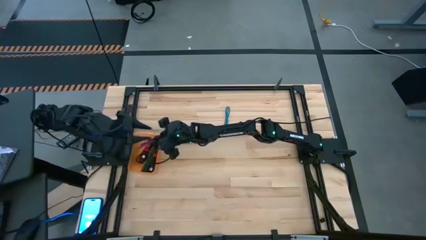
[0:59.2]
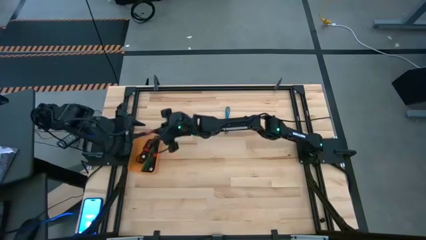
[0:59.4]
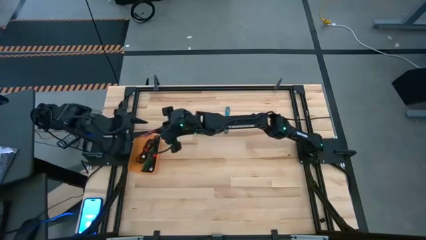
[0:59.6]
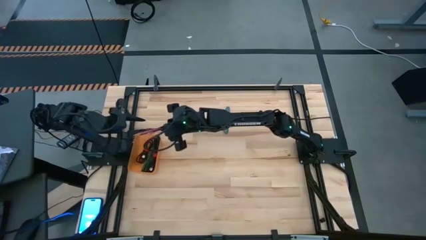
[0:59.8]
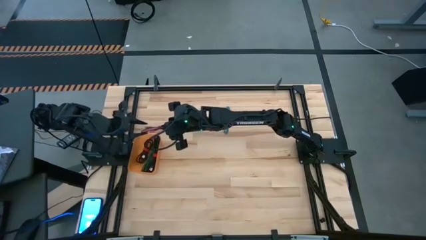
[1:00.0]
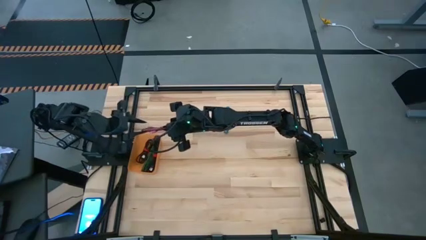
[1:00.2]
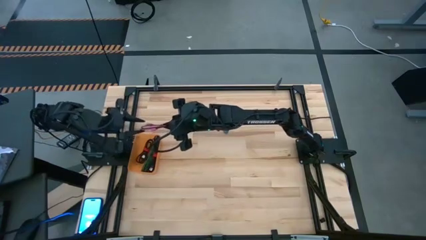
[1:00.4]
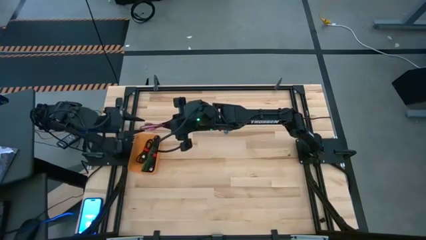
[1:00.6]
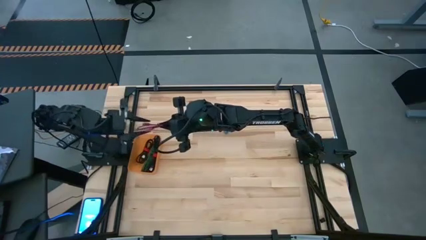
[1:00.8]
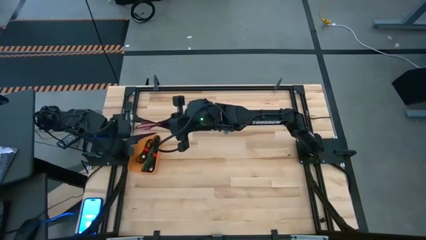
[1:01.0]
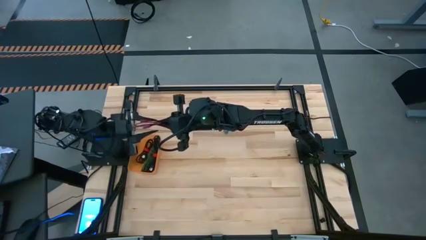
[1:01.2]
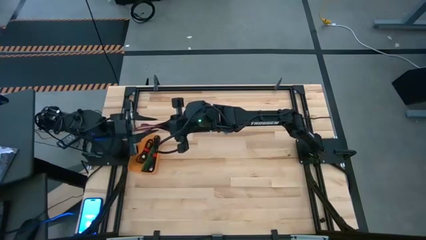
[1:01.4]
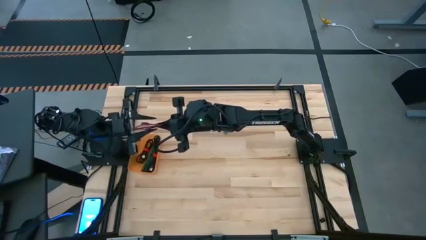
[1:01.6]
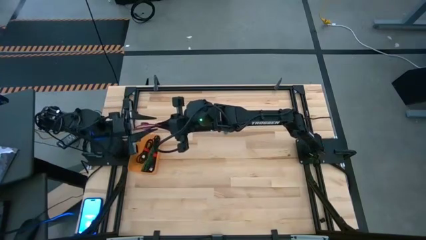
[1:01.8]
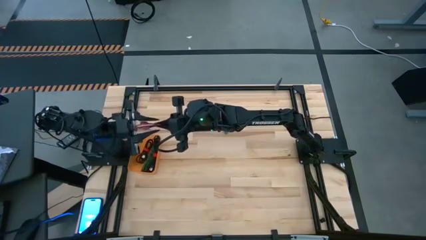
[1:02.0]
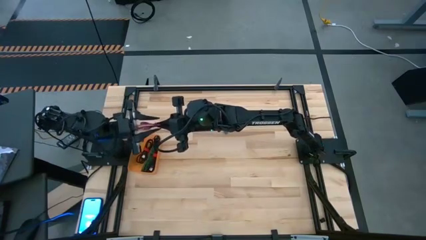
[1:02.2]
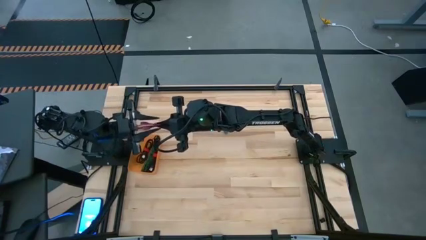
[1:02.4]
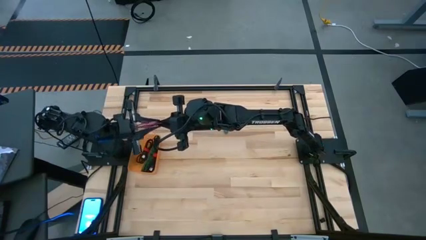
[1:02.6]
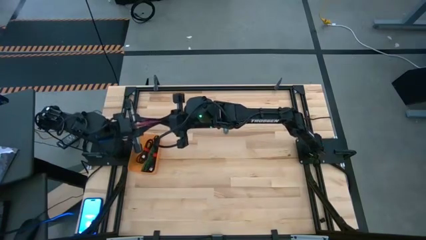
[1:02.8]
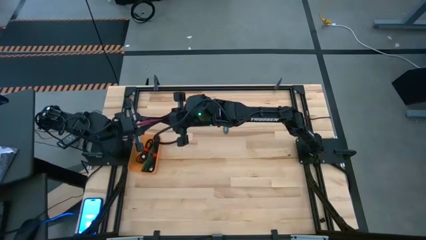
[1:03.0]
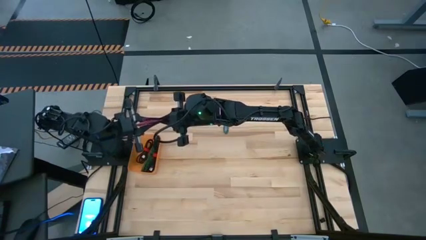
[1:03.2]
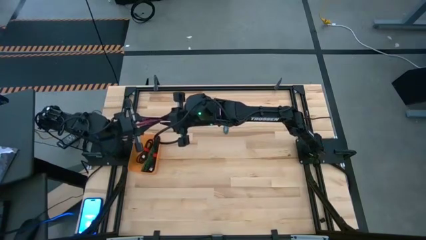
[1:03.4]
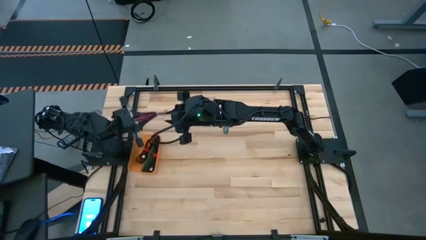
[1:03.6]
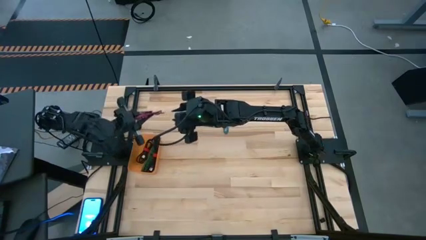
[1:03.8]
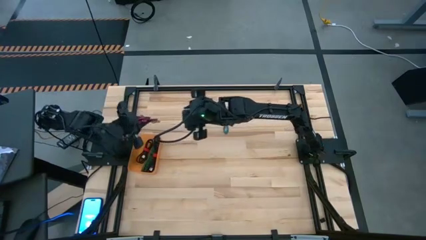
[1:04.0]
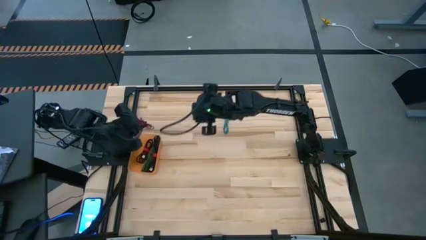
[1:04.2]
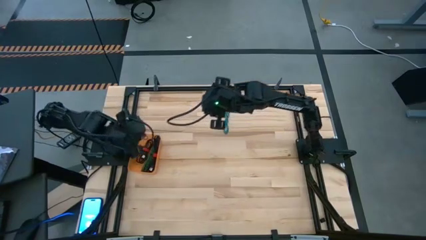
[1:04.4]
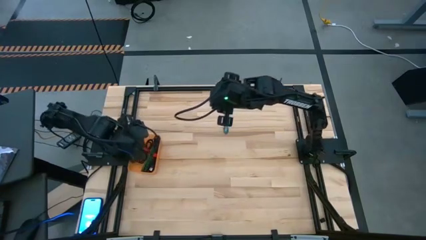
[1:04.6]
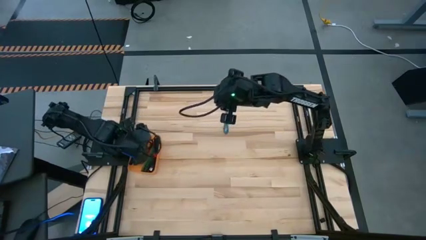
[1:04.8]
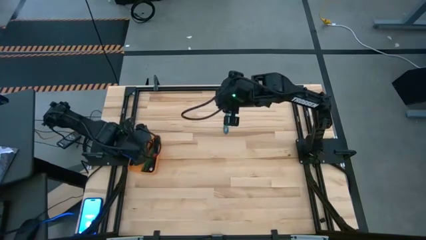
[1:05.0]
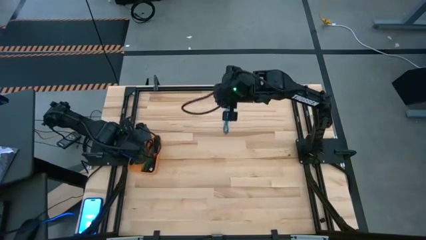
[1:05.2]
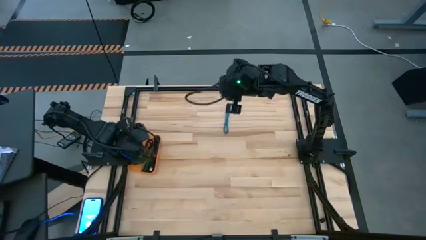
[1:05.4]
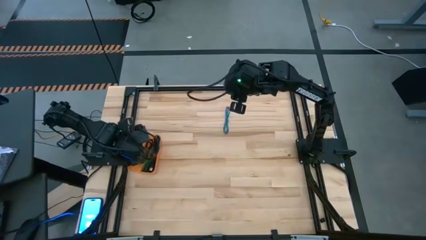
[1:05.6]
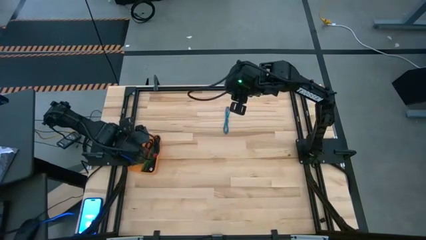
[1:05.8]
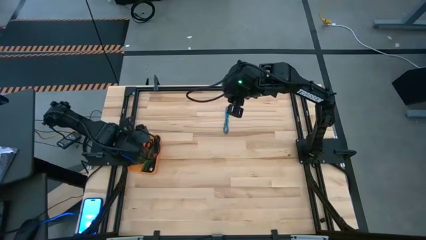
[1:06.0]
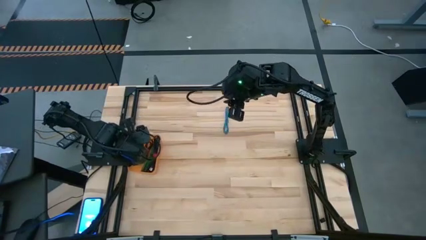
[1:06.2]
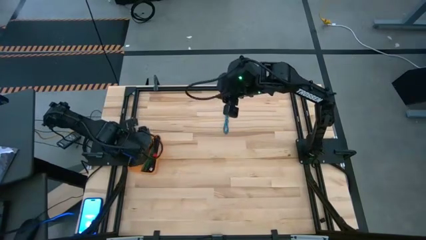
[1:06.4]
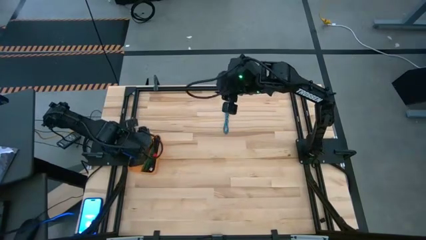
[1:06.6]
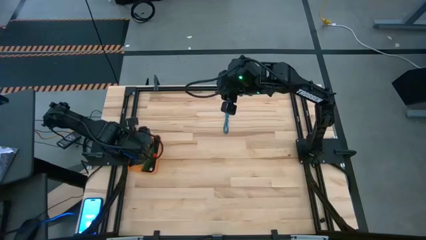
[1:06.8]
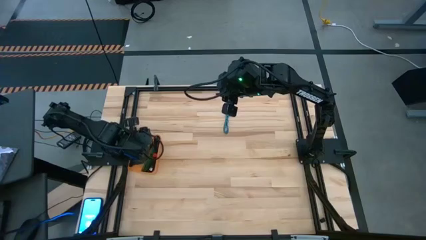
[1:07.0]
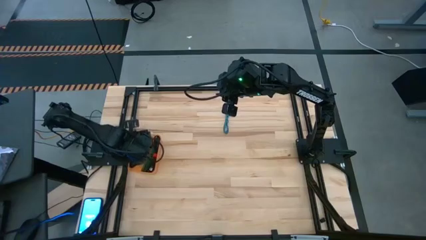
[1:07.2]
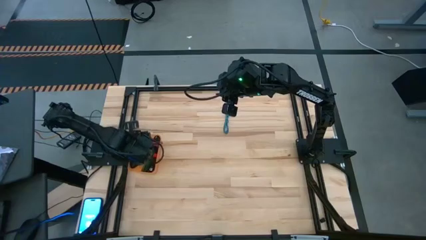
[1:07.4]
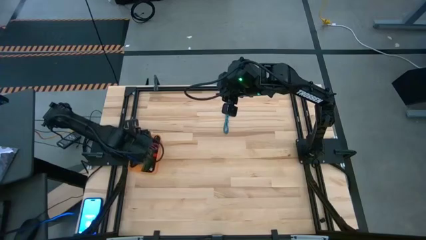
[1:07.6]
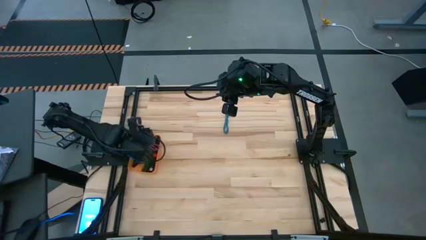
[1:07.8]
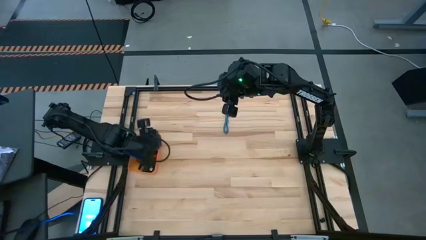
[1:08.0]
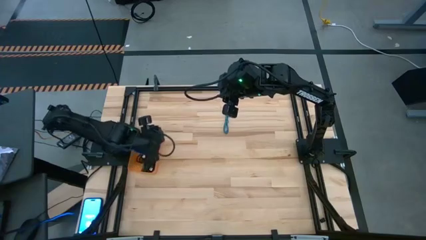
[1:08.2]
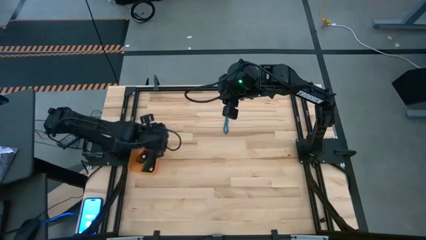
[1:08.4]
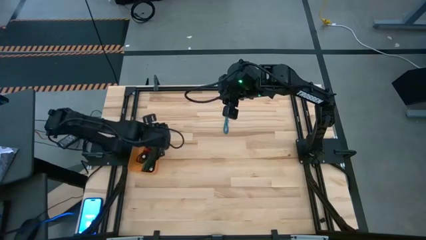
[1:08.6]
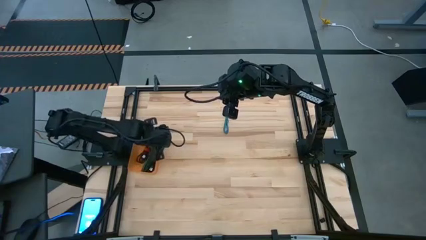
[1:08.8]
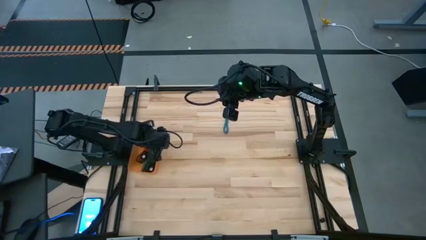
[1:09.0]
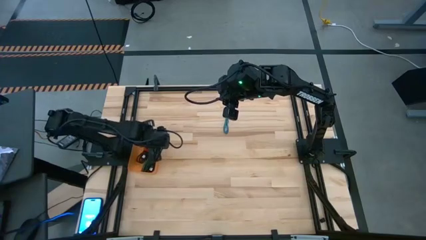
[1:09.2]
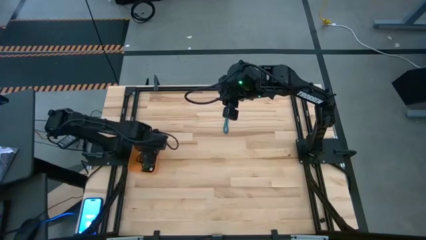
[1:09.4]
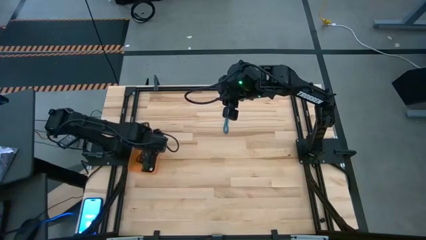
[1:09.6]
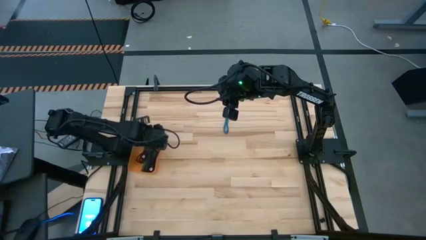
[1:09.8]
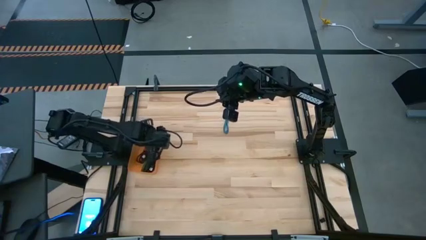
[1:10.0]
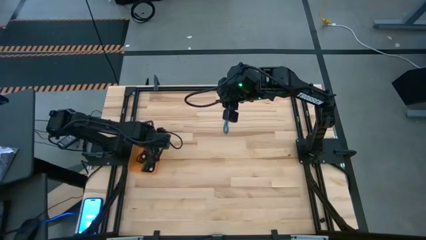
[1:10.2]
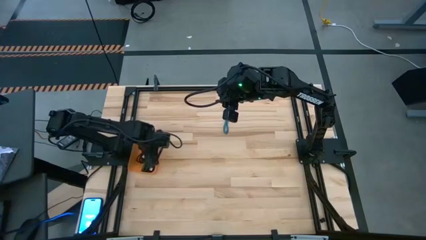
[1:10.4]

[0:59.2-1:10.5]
Task: Pick and place USB-C Cables
Put the pink USB cable into the orange bin

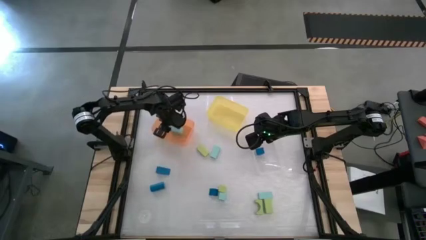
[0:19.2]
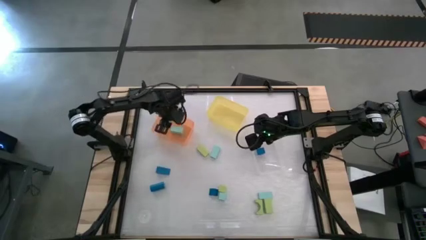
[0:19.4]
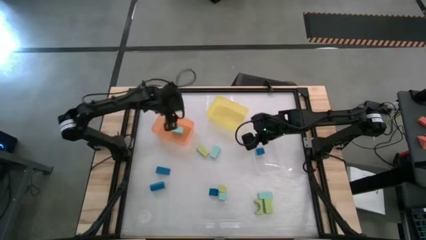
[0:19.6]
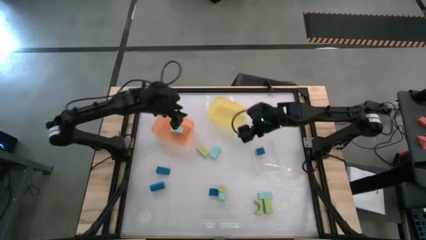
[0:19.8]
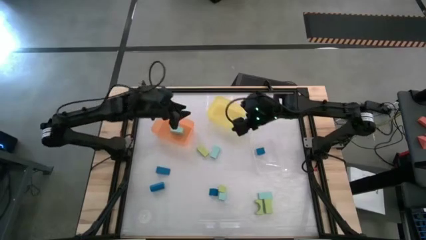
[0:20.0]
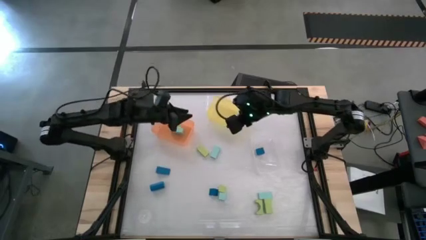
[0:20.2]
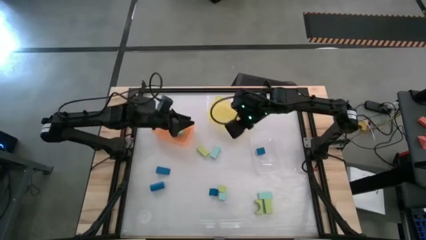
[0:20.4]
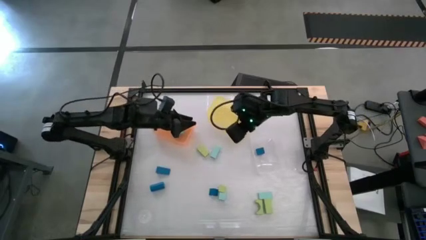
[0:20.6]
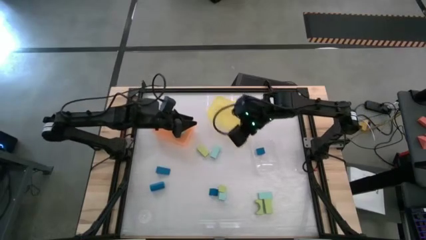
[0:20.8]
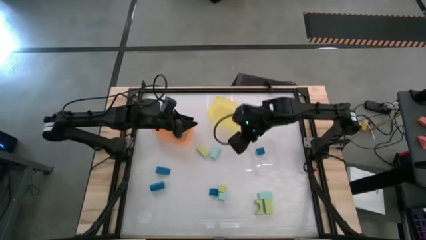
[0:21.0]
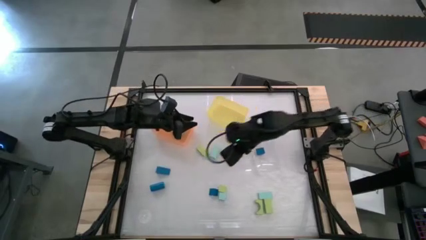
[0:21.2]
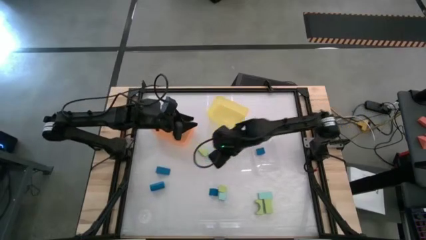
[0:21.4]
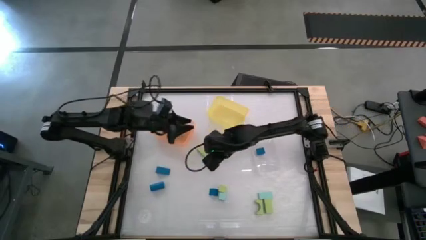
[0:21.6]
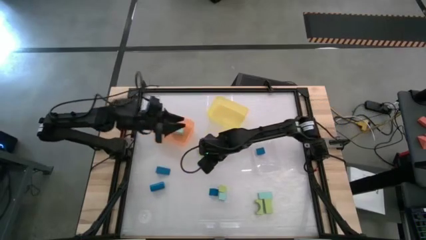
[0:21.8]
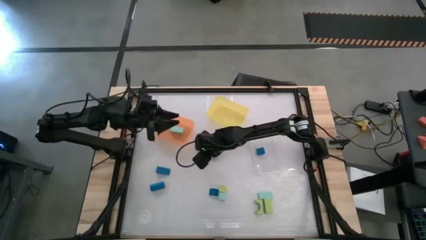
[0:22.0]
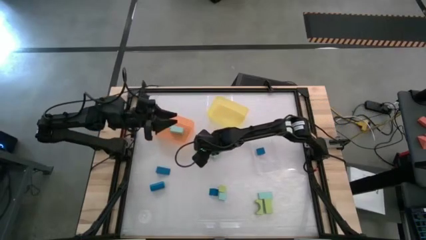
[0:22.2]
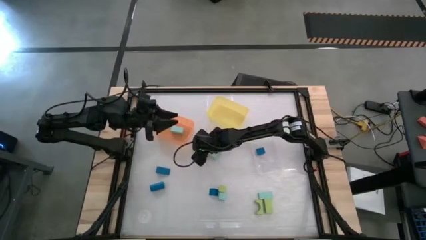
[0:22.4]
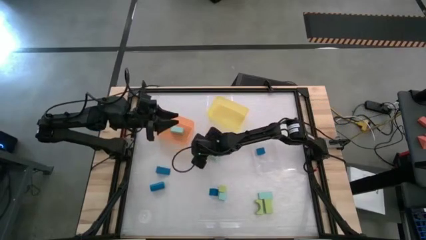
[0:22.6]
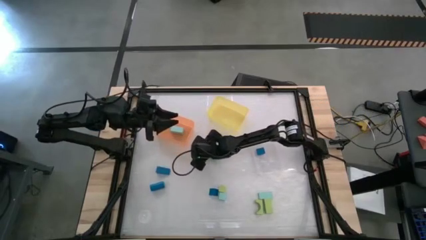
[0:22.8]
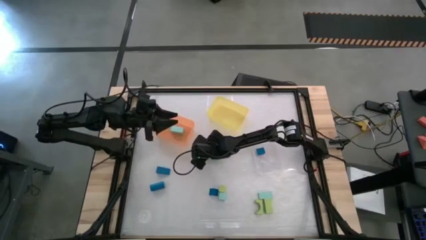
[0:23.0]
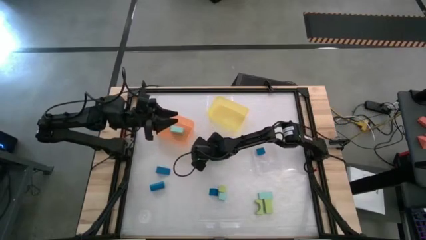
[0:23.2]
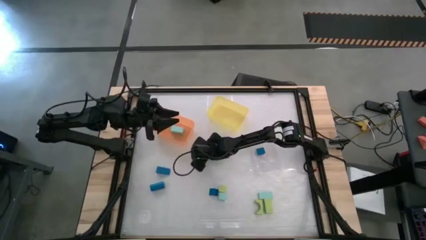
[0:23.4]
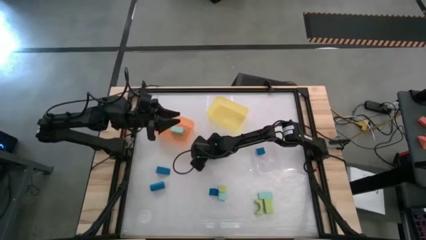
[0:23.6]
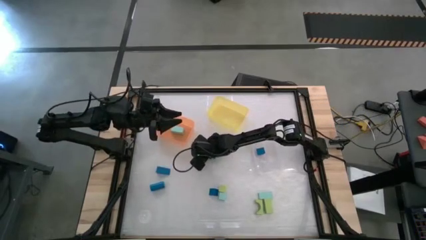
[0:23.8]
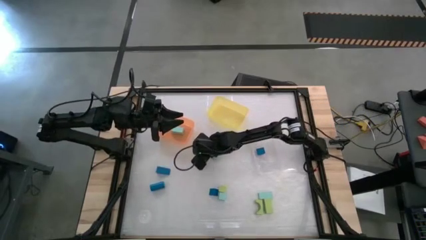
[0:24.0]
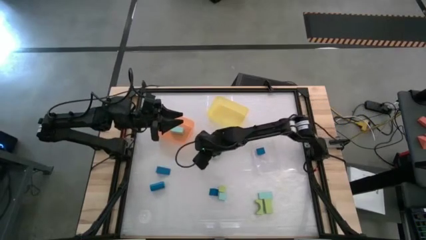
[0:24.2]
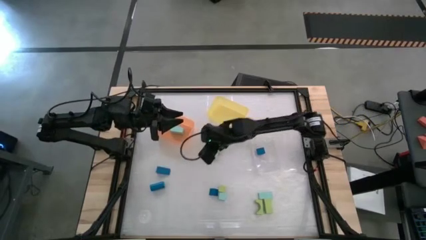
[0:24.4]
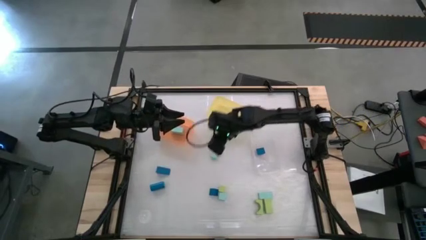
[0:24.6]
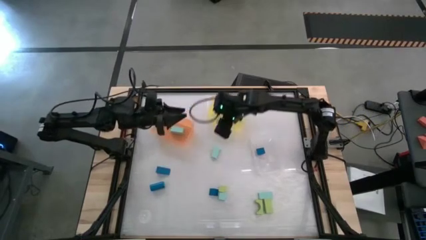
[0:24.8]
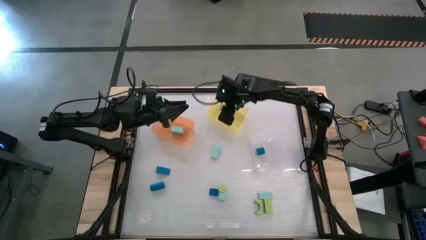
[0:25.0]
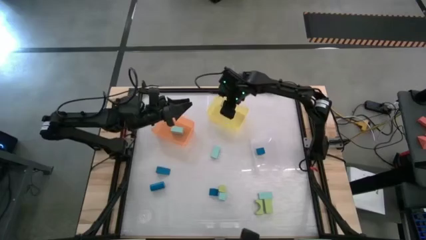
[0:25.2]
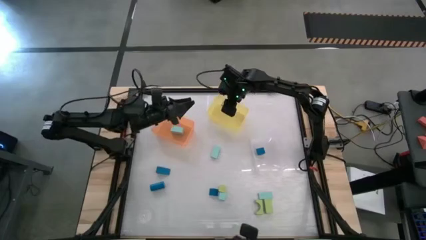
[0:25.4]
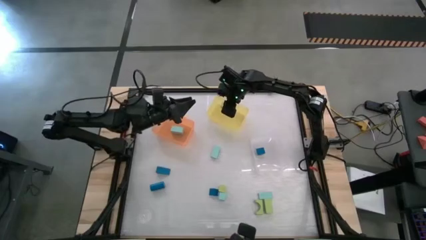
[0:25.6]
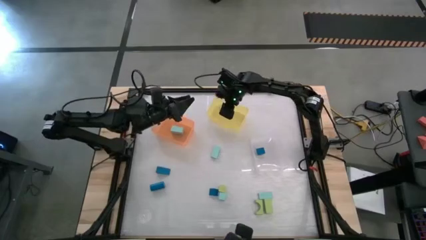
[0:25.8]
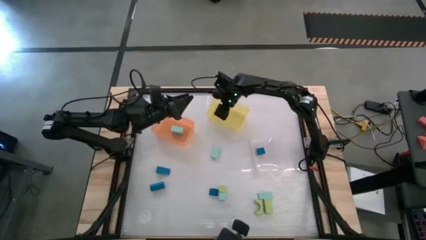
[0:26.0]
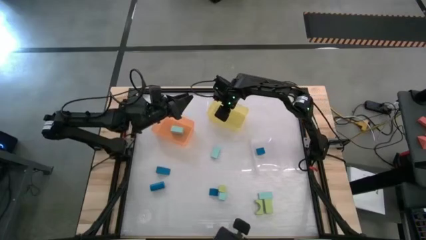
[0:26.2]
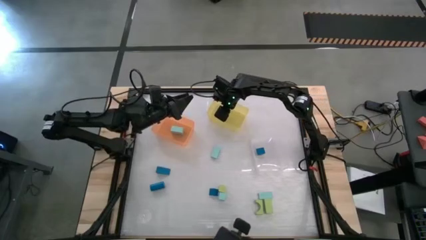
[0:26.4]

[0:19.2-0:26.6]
Task: Sort & place blocks by color
Put the light green block into the yellow bin
